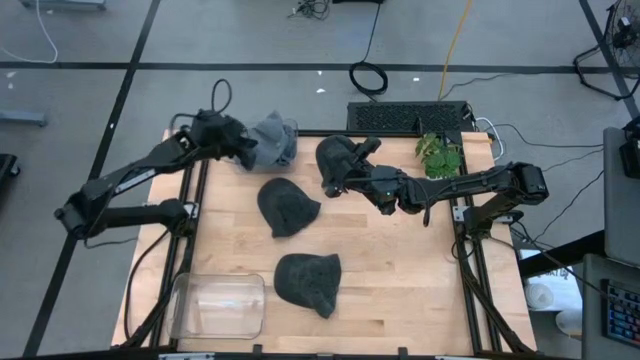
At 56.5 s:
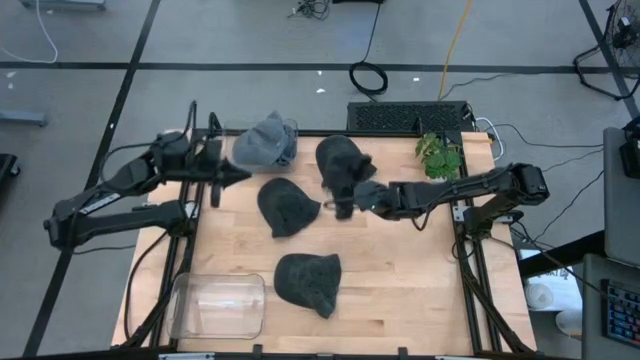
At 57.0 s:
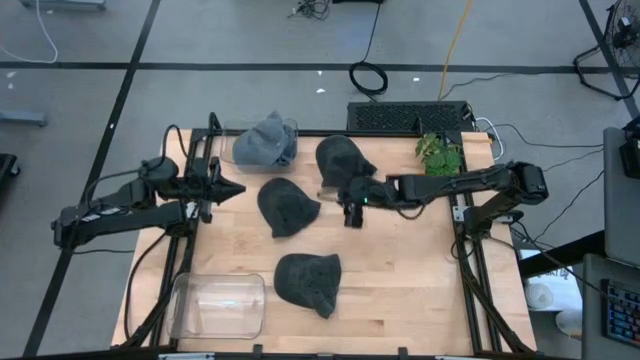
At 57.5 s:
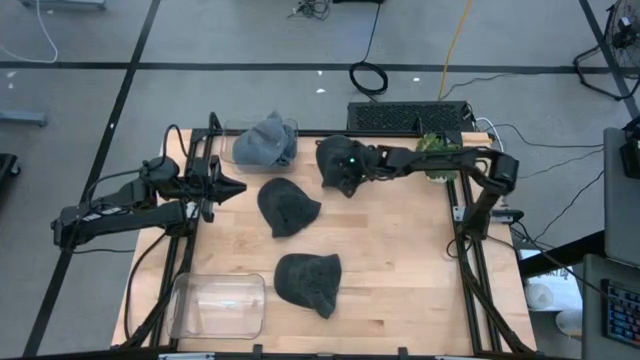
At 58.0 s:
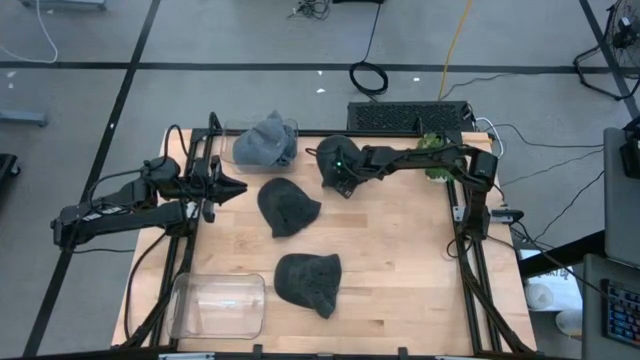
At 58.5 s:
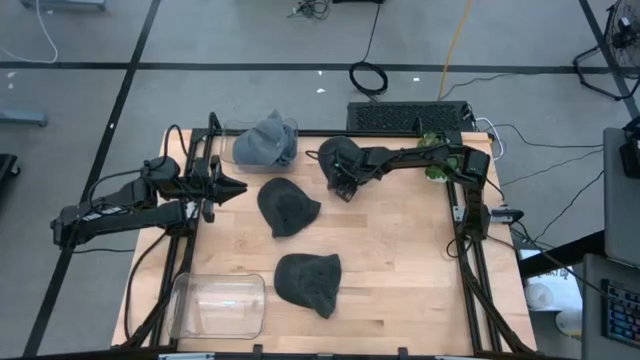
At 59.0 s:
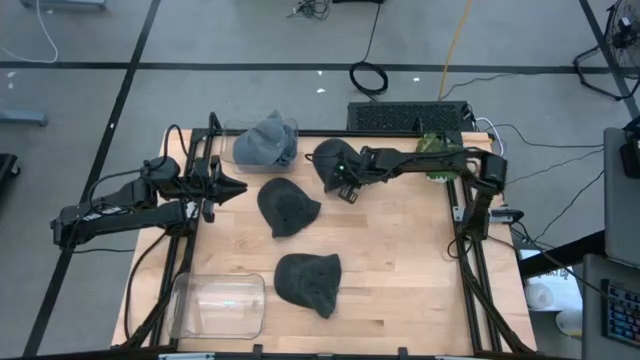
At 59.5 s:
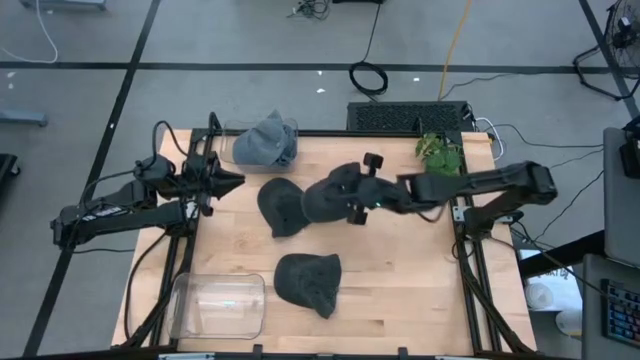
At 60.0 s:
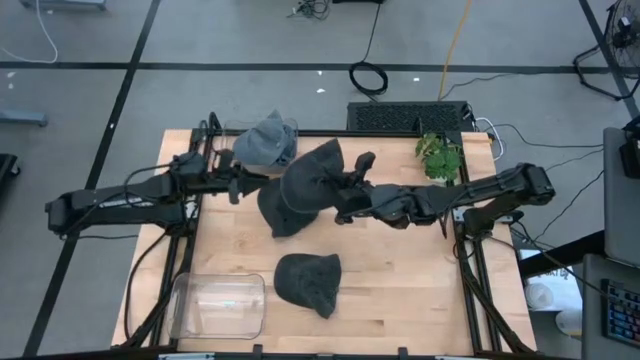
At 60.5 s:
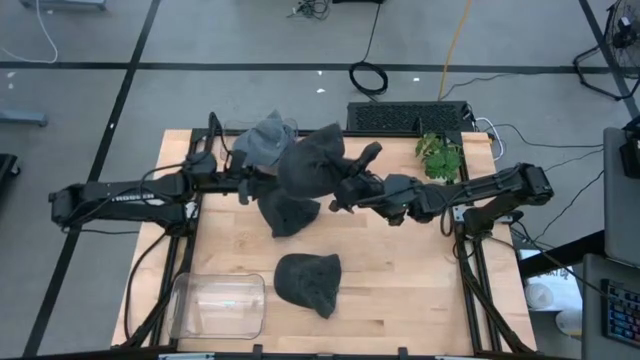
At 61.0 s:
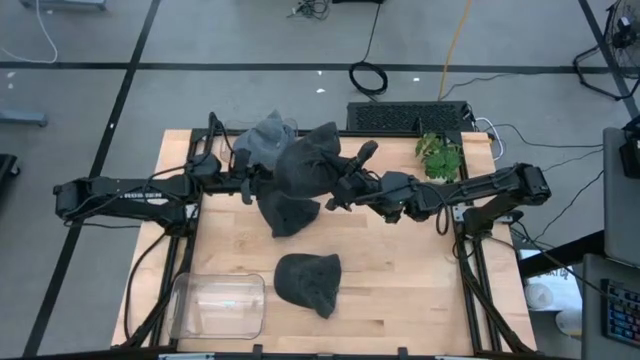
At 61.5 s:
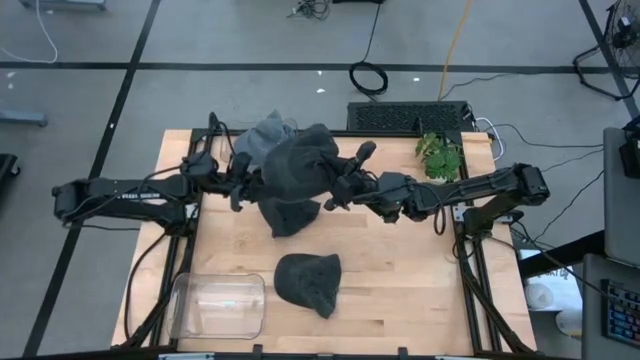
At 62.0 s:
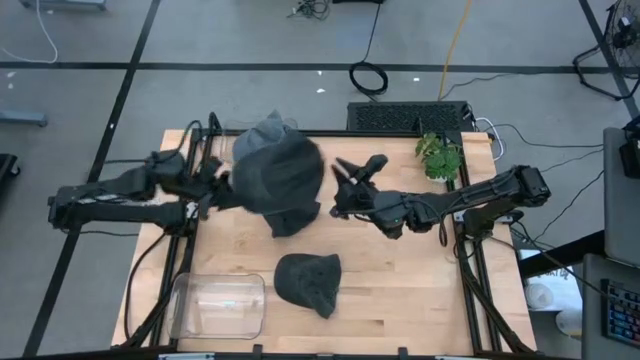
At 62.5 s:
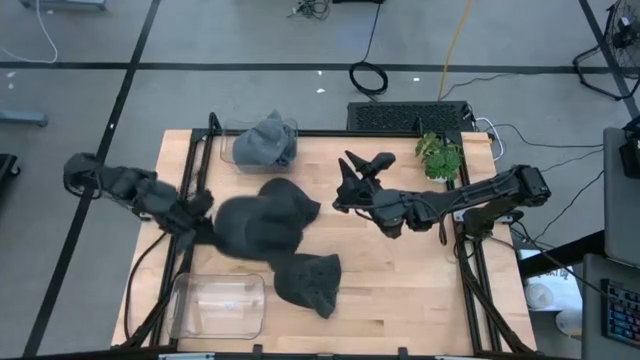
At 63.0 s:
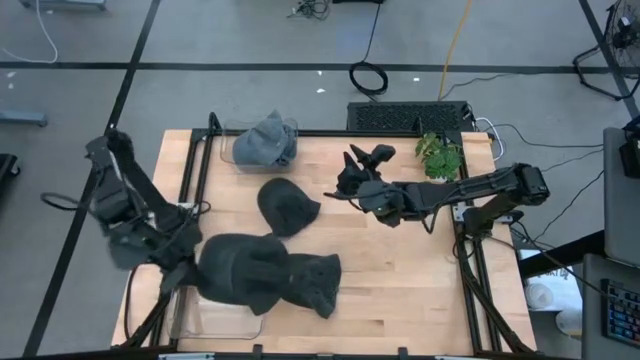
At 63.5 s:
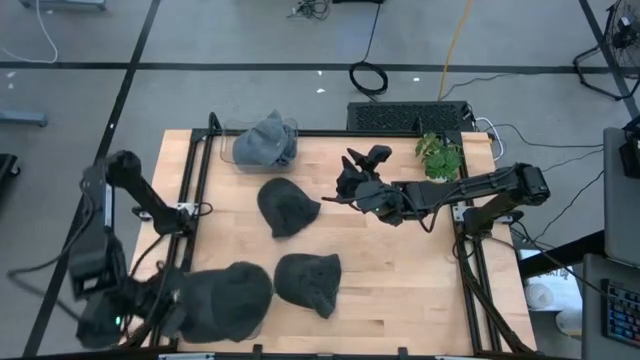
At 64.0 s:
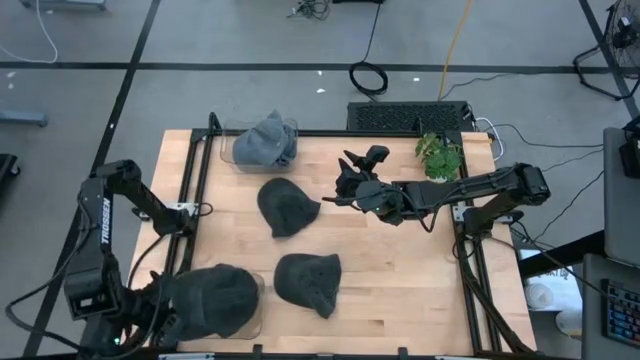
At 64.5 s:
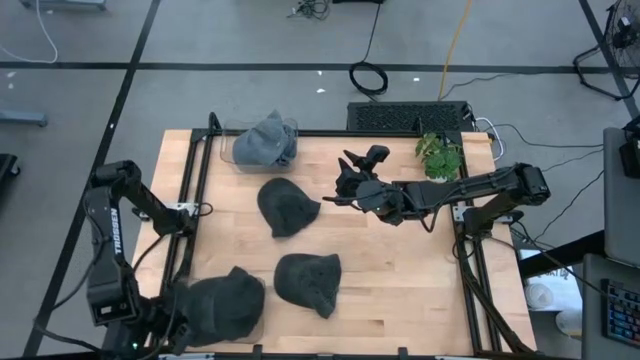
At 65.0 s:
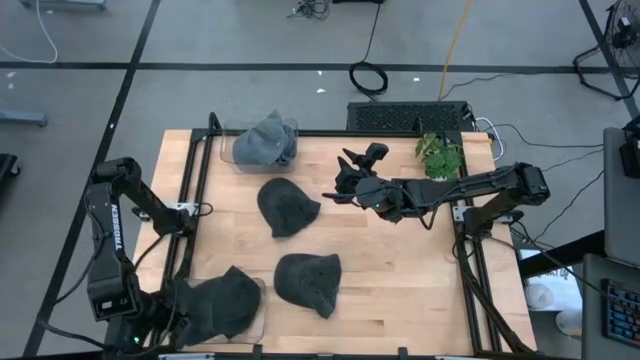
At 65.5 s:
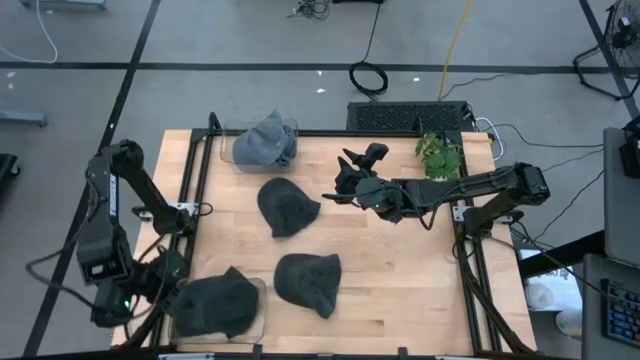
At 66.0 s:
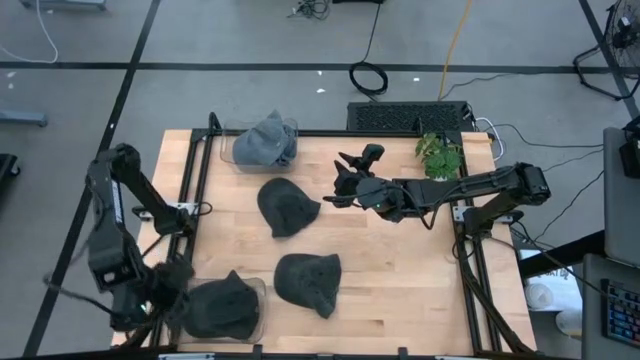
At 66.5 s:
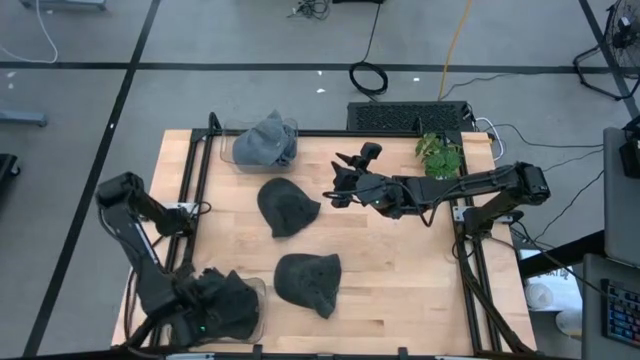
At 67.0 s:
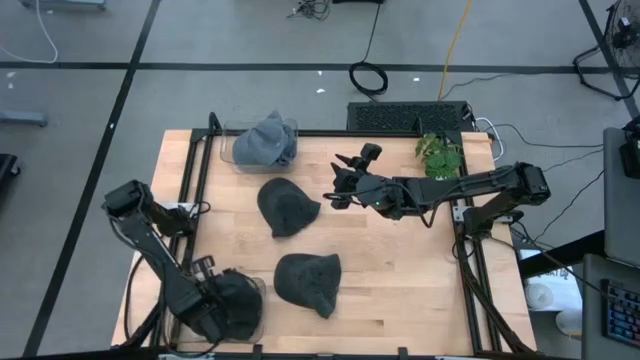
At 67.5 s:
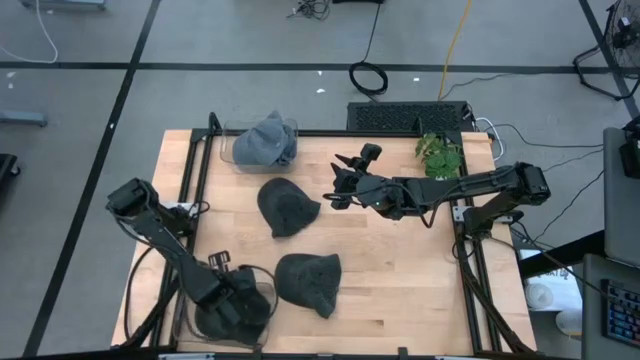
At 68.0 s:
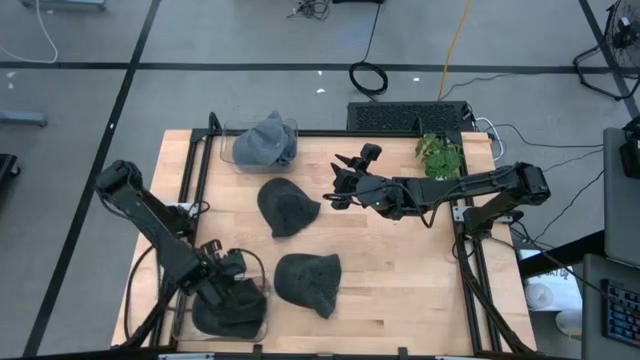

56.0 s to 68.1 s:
Task: Pick & Place hat
Put the top black cap into the bottom transparent bin

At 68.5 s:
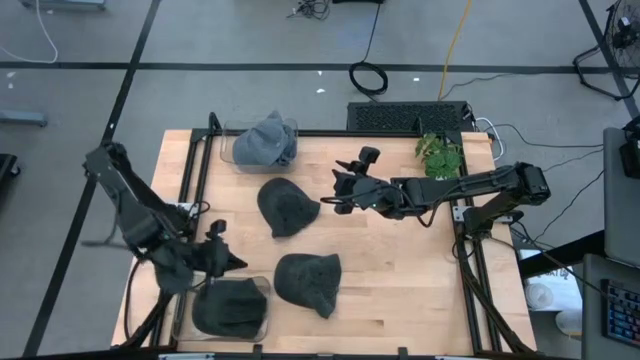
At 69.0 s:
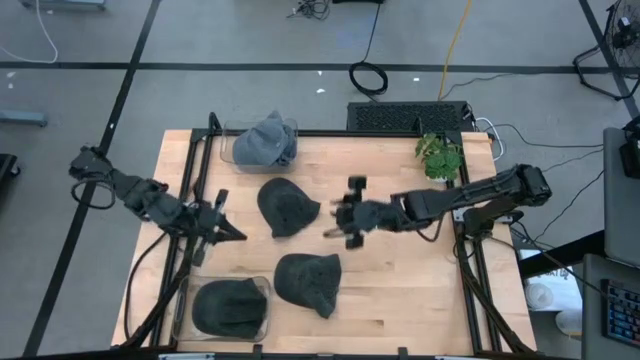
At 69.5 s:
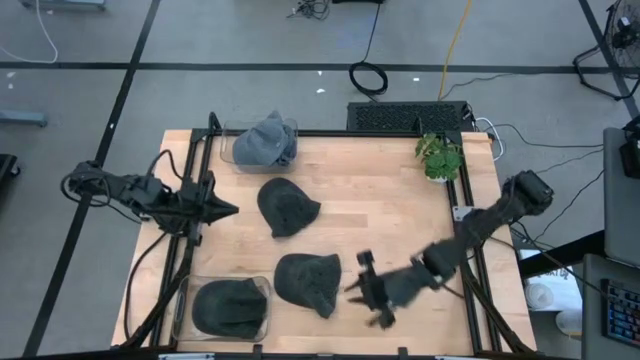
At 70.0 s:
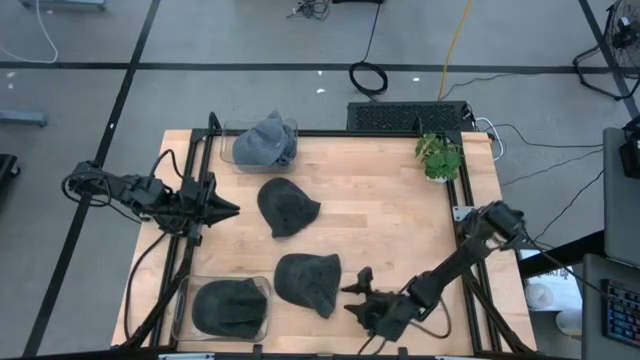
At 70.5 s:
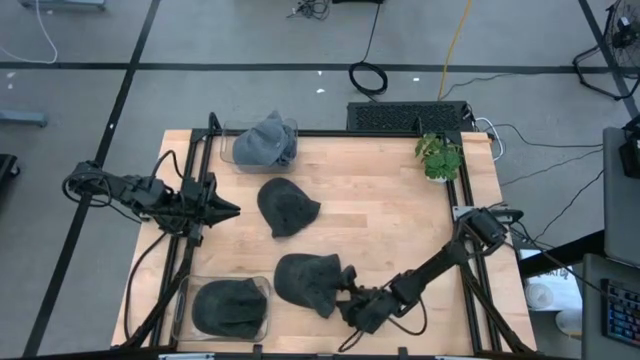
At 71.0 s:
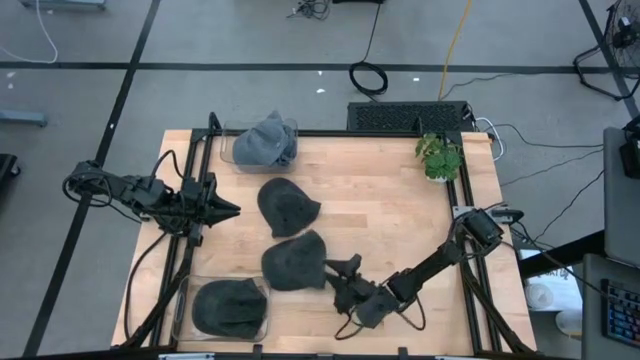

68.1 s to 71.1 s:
Put the bottom black cap into the bottom transparent bin

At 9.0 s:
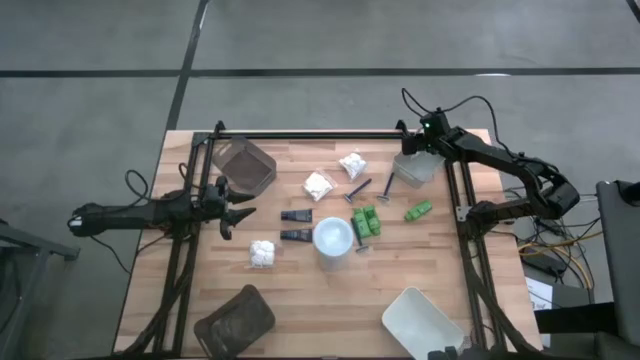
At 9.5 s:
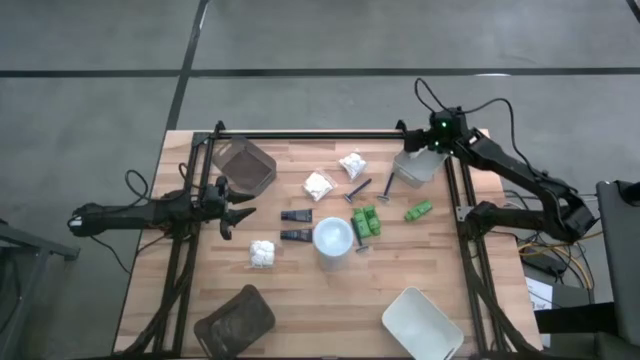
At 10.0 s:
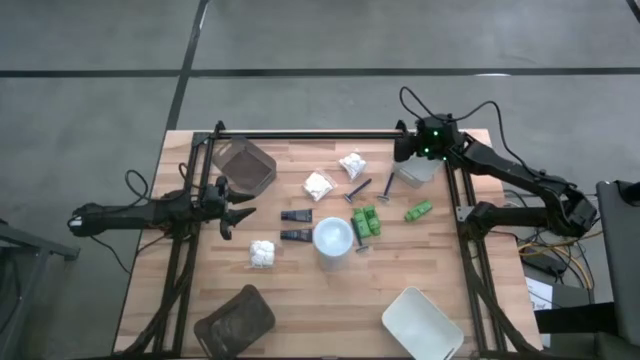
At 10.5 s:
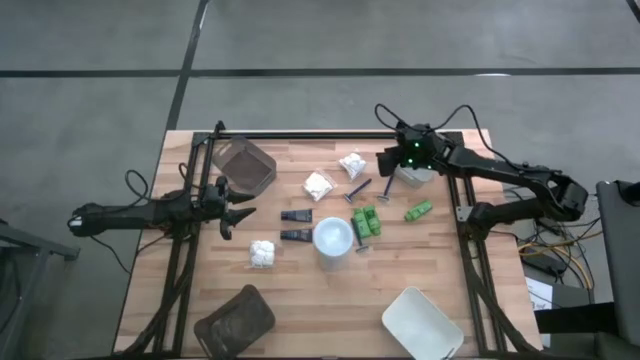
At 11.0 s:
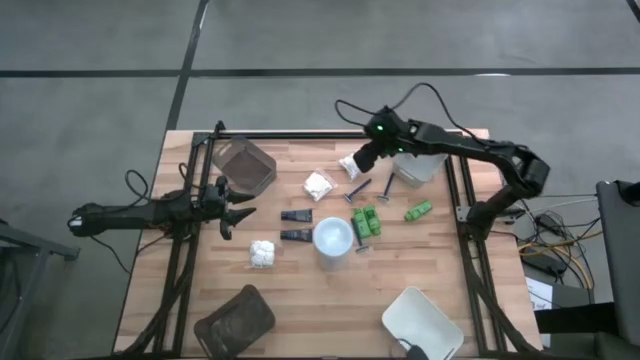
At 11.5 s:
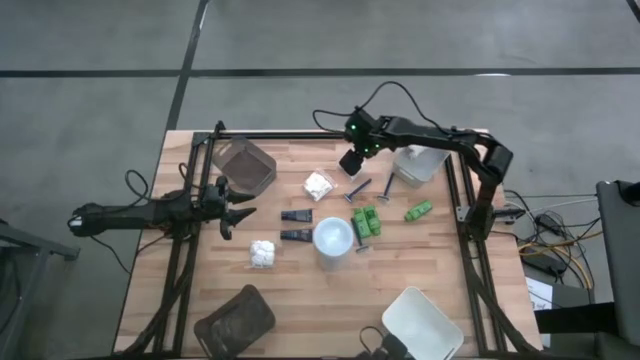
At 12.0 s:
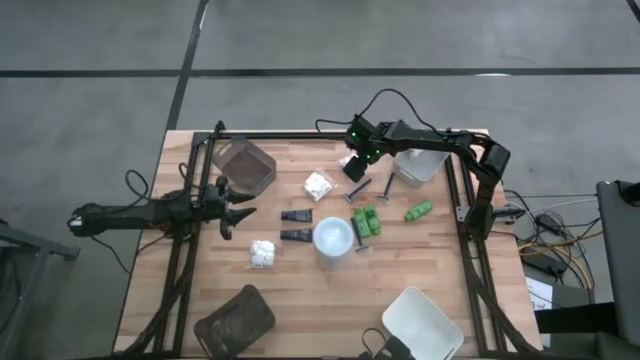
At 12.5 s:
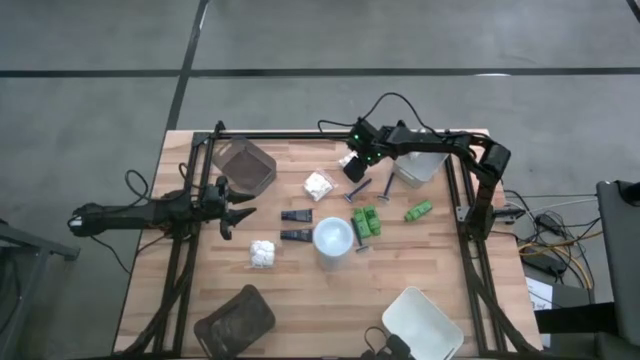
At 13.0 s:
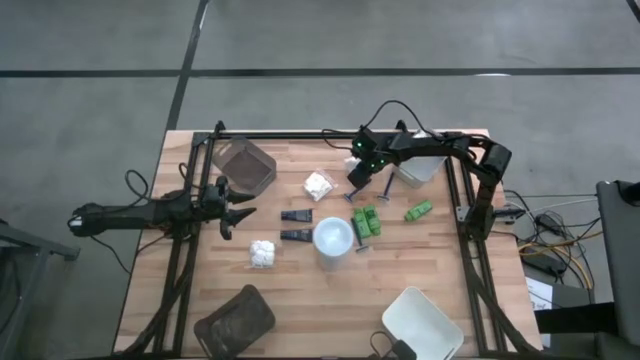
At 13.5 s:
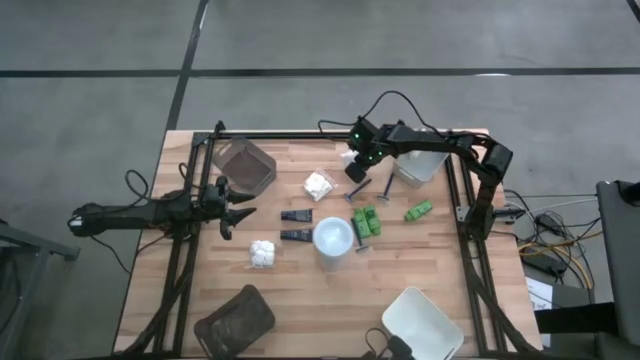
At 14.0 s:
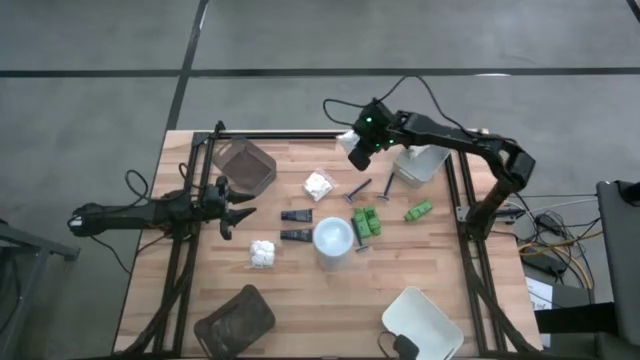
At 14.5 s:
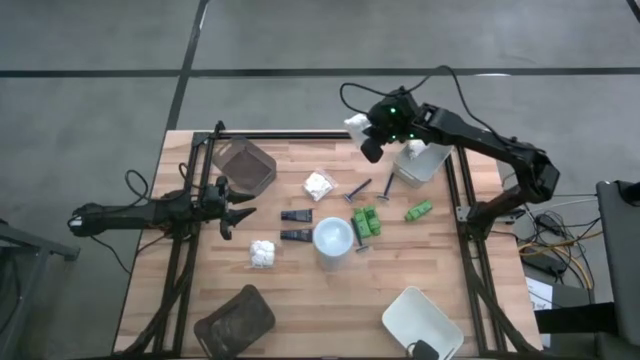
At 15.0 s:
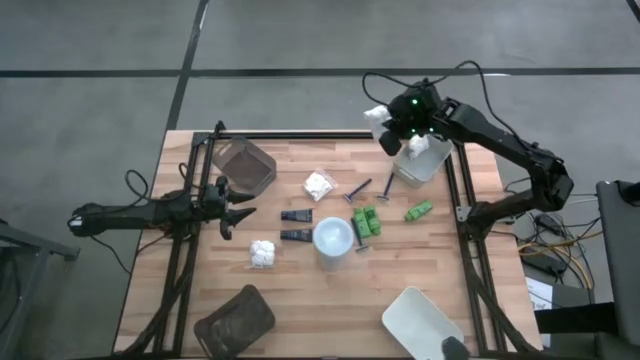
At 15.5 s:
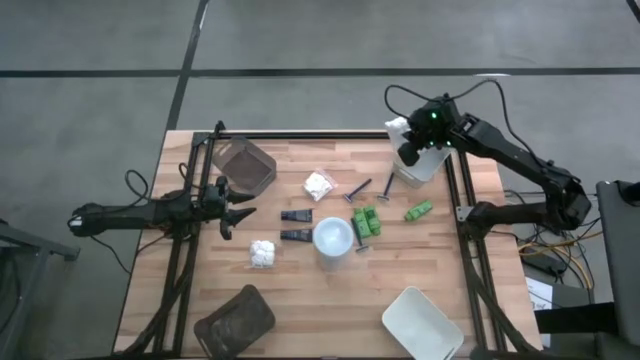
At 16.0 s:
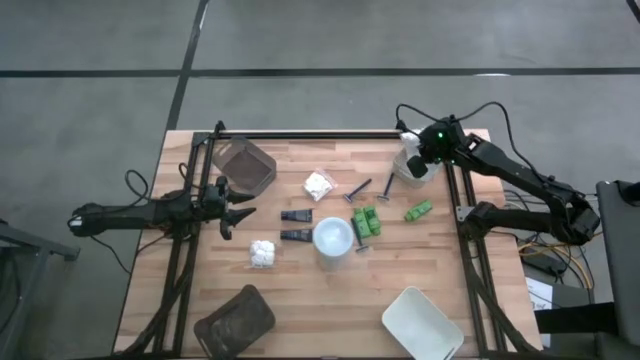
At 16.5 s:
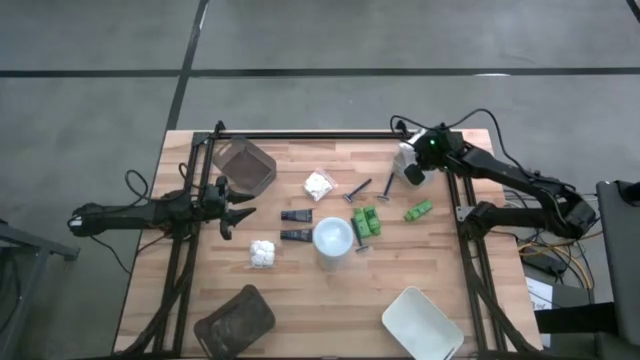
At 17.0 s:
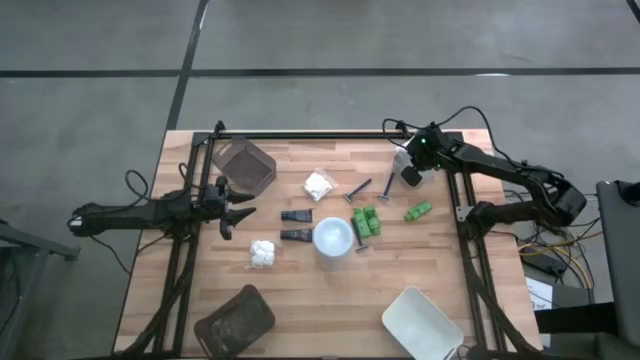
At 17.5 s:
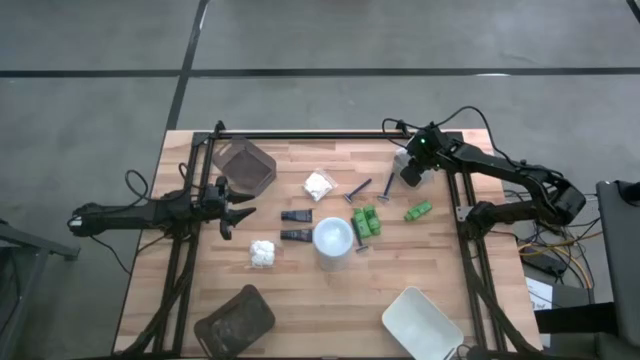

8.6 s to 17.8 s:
Task: Pick & Place Travel size toiletries
Put the white cotton pack into the gray bin
